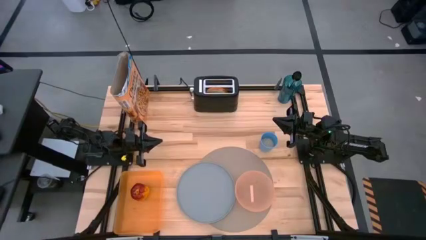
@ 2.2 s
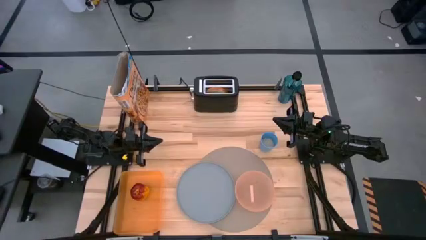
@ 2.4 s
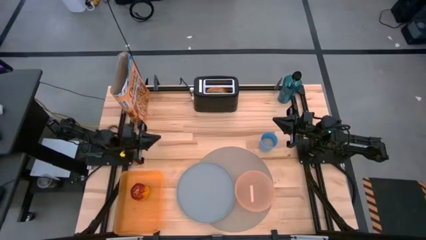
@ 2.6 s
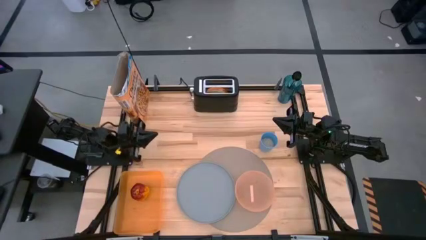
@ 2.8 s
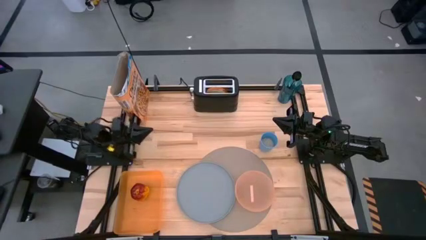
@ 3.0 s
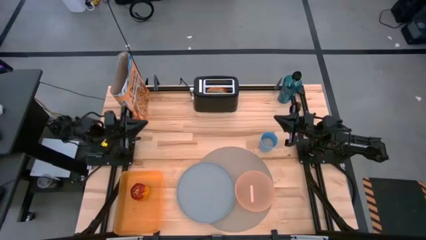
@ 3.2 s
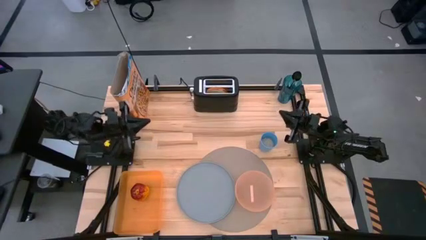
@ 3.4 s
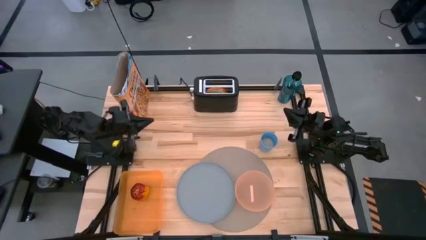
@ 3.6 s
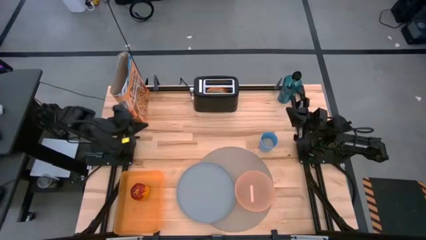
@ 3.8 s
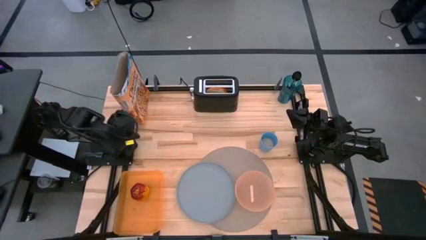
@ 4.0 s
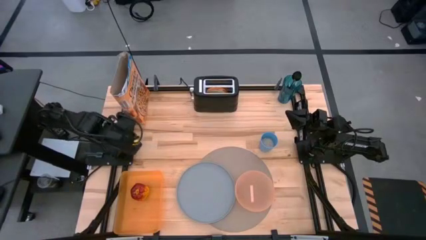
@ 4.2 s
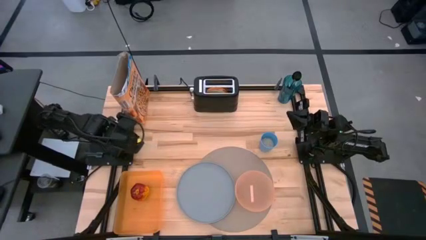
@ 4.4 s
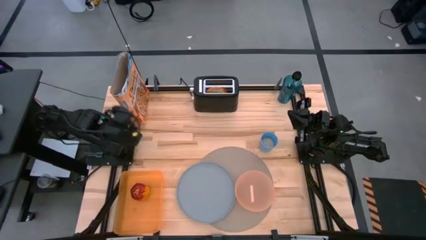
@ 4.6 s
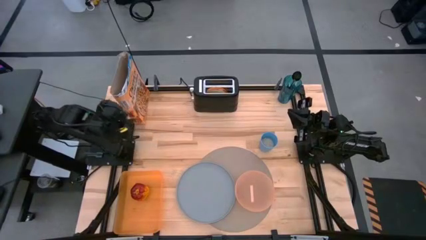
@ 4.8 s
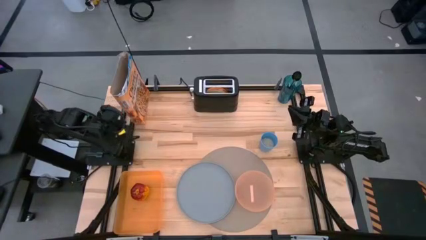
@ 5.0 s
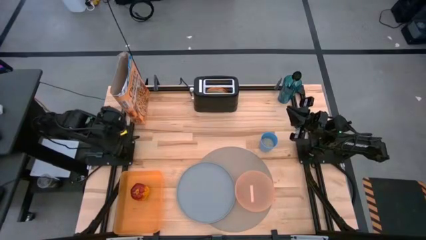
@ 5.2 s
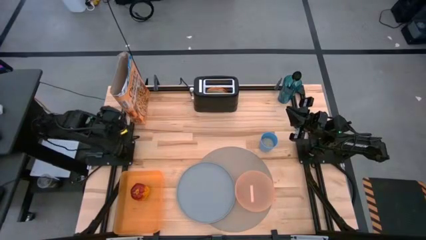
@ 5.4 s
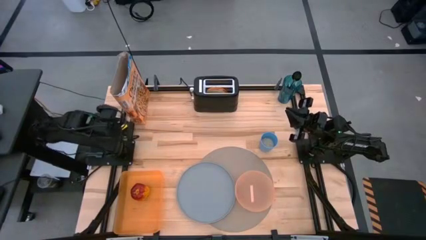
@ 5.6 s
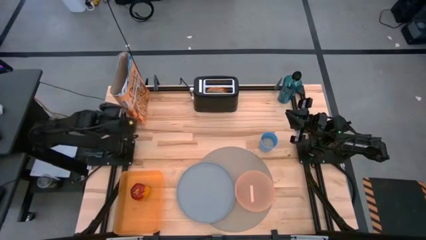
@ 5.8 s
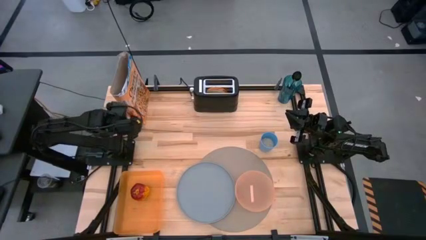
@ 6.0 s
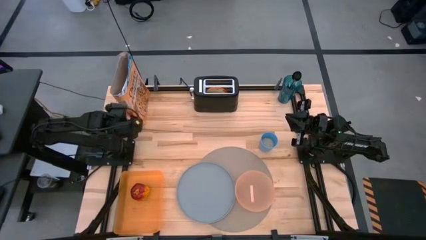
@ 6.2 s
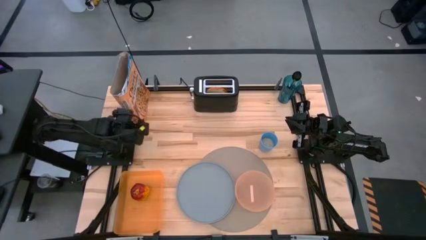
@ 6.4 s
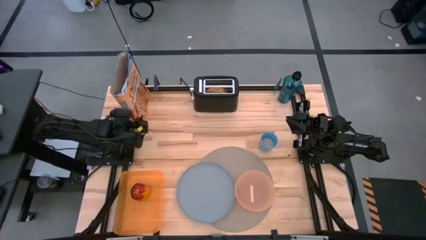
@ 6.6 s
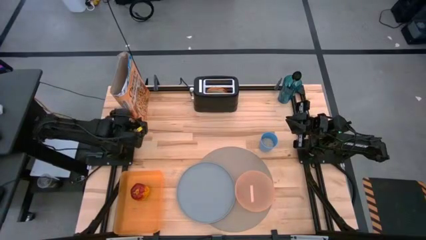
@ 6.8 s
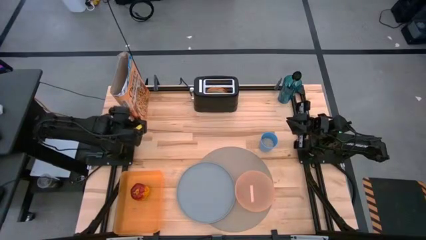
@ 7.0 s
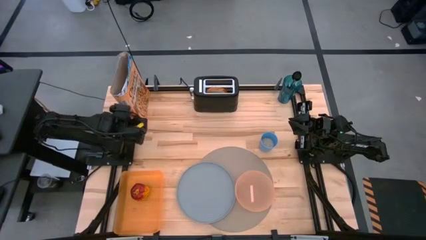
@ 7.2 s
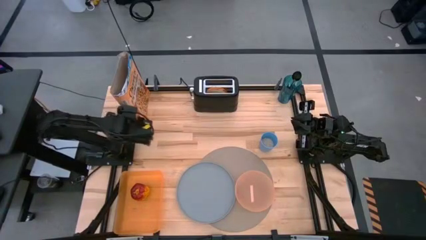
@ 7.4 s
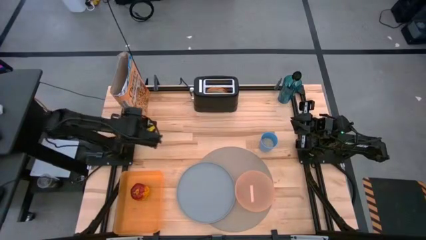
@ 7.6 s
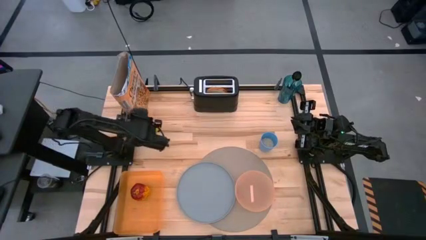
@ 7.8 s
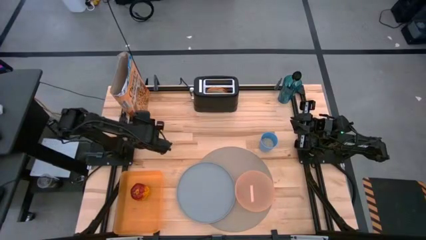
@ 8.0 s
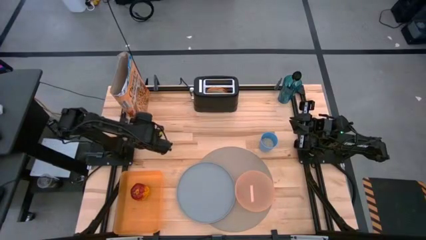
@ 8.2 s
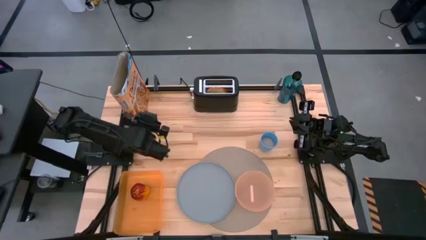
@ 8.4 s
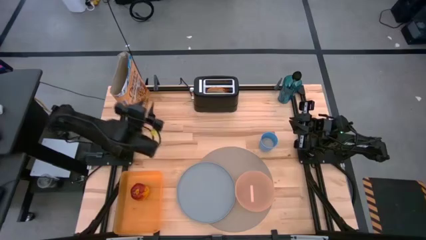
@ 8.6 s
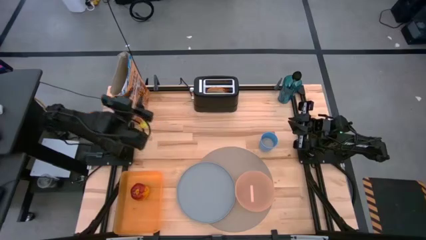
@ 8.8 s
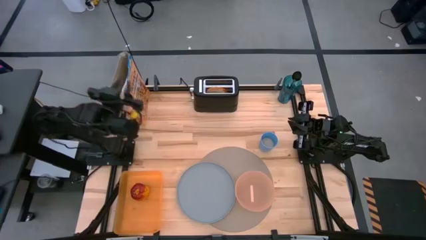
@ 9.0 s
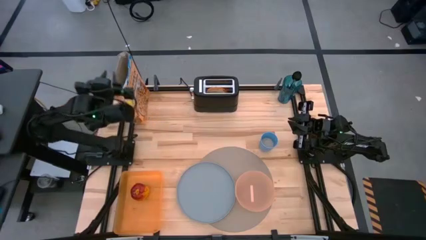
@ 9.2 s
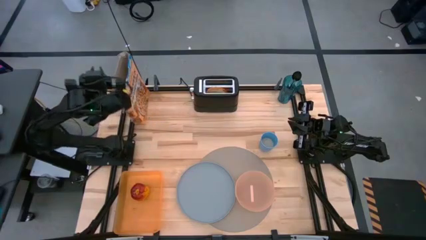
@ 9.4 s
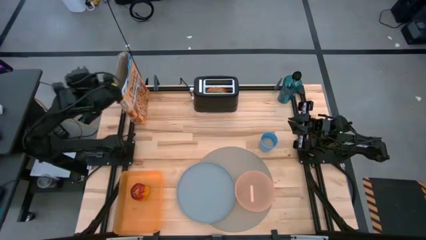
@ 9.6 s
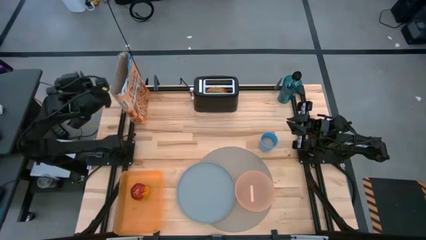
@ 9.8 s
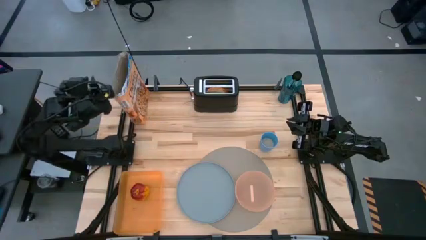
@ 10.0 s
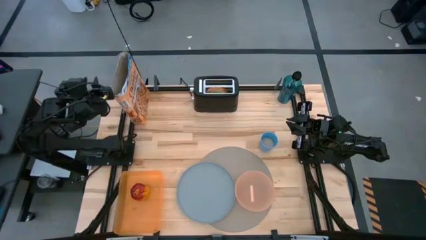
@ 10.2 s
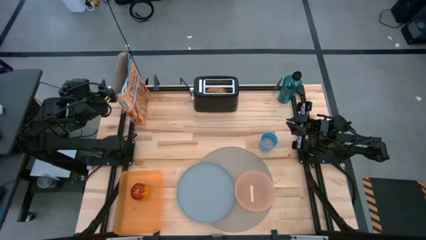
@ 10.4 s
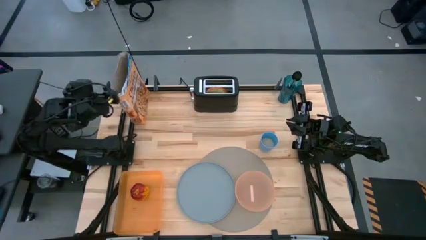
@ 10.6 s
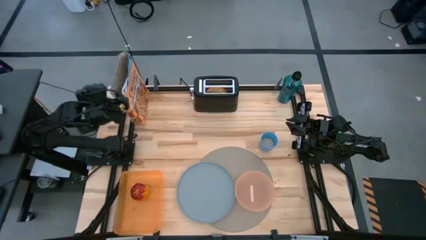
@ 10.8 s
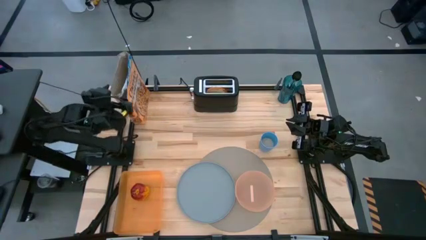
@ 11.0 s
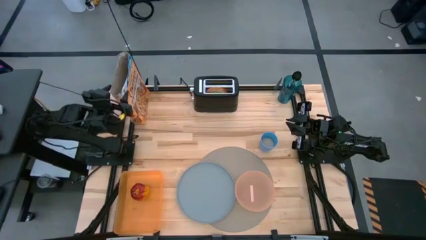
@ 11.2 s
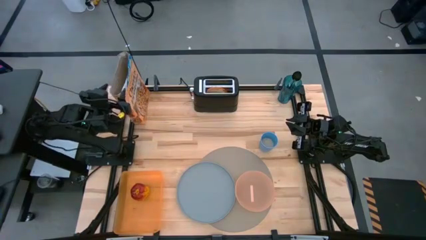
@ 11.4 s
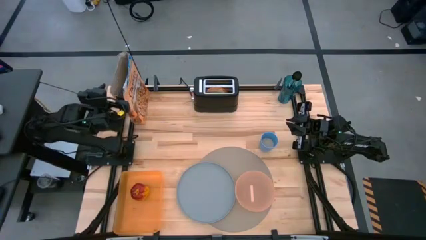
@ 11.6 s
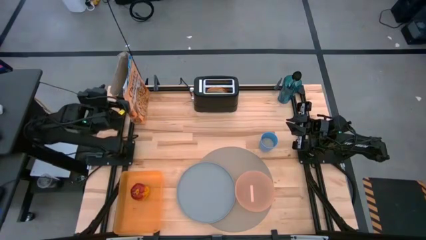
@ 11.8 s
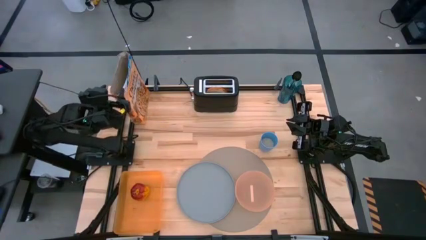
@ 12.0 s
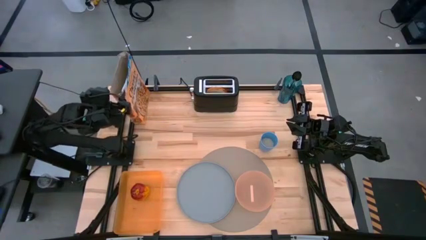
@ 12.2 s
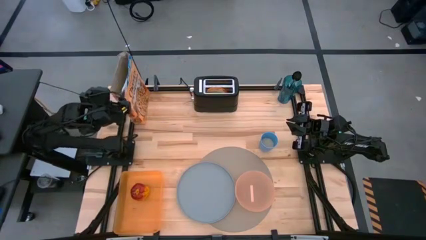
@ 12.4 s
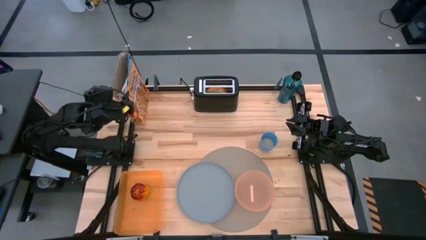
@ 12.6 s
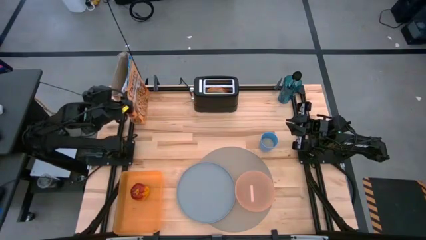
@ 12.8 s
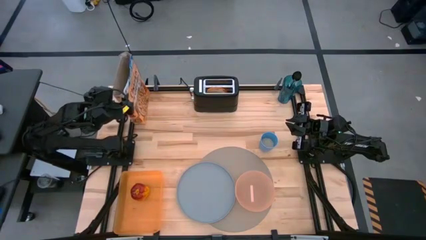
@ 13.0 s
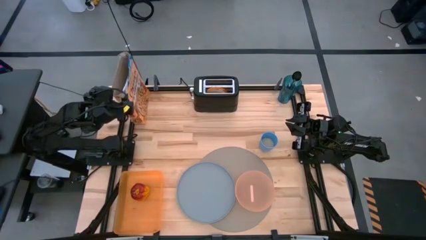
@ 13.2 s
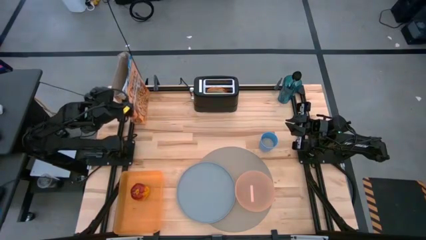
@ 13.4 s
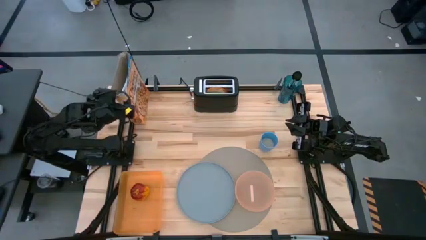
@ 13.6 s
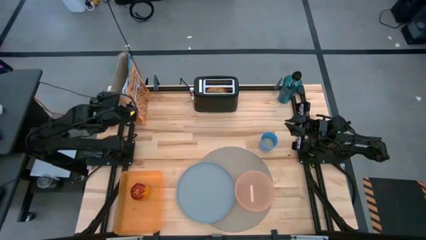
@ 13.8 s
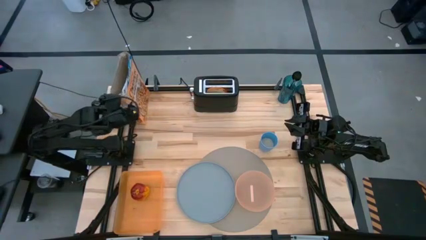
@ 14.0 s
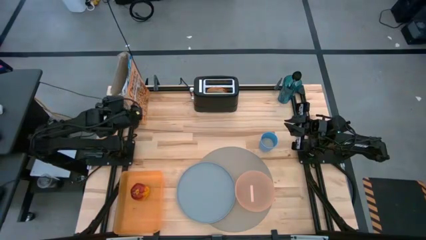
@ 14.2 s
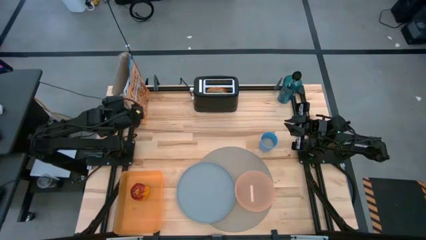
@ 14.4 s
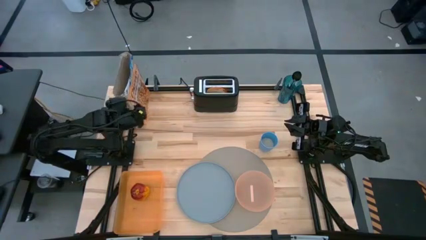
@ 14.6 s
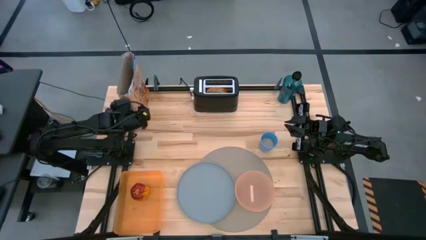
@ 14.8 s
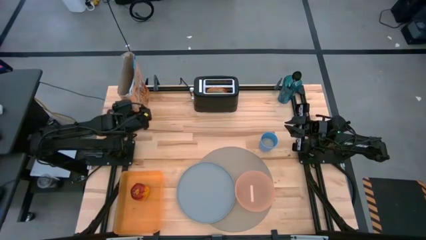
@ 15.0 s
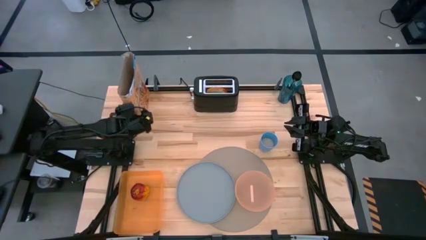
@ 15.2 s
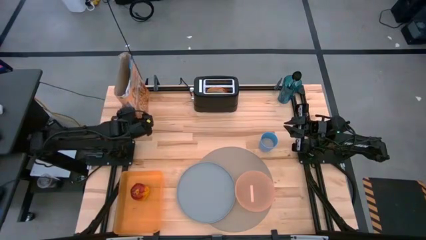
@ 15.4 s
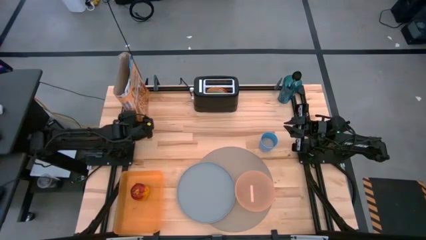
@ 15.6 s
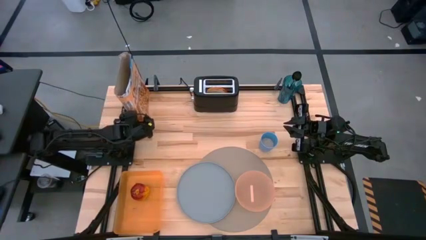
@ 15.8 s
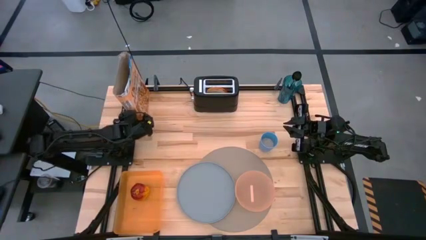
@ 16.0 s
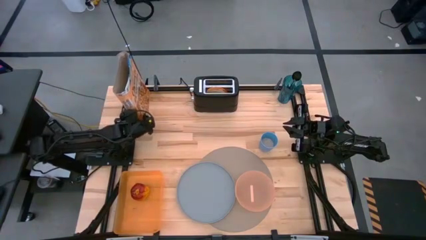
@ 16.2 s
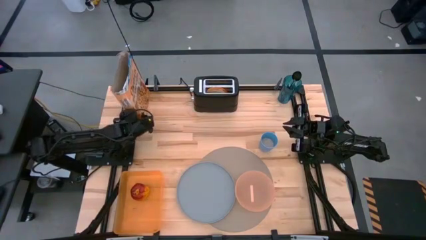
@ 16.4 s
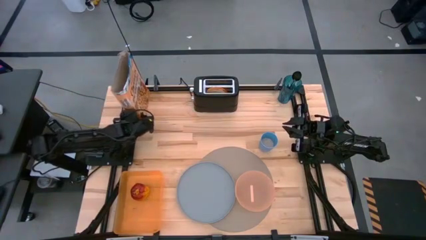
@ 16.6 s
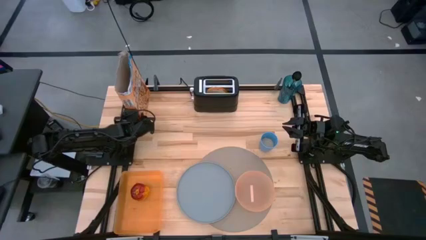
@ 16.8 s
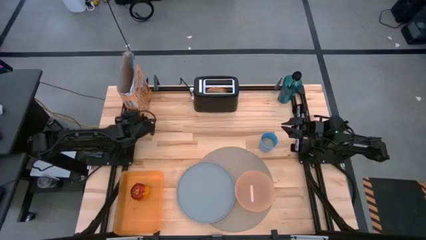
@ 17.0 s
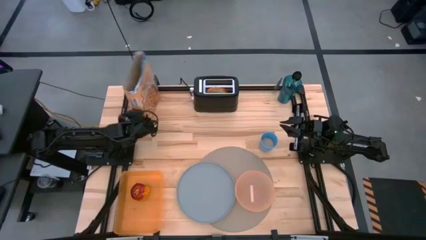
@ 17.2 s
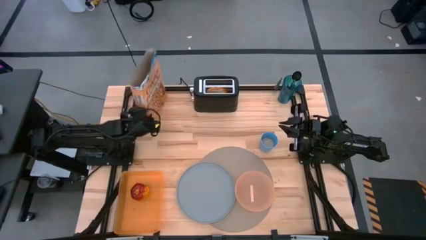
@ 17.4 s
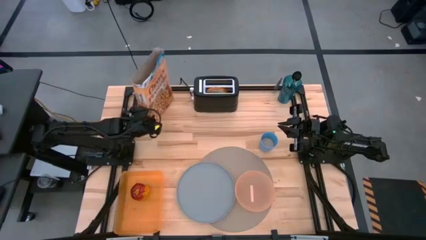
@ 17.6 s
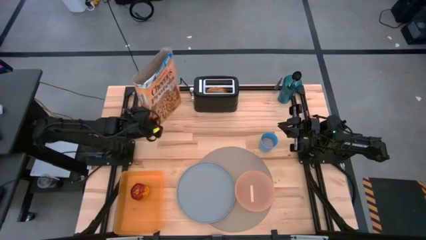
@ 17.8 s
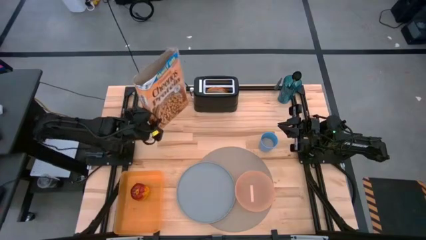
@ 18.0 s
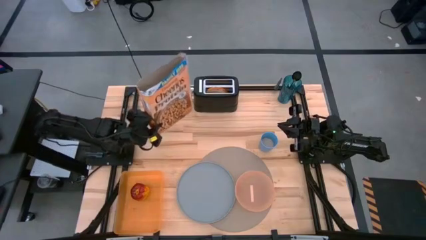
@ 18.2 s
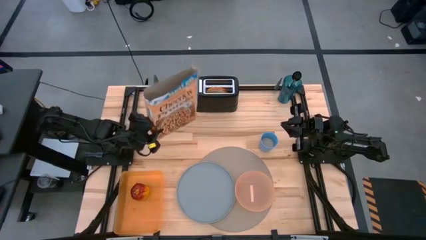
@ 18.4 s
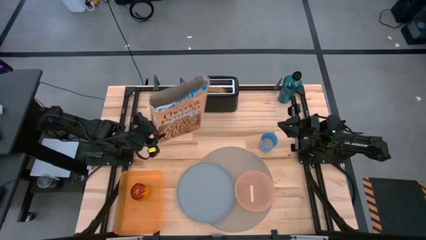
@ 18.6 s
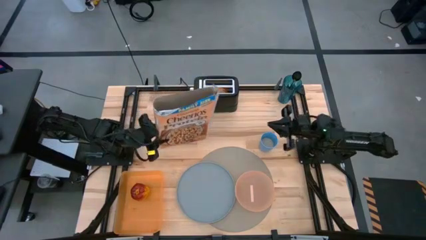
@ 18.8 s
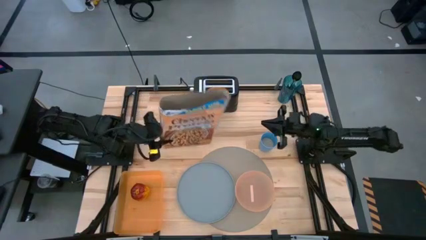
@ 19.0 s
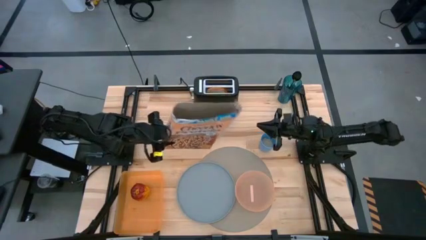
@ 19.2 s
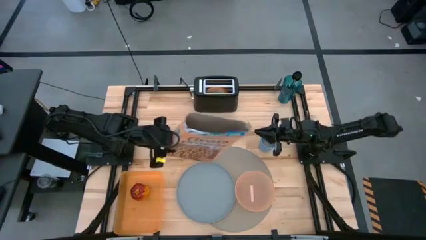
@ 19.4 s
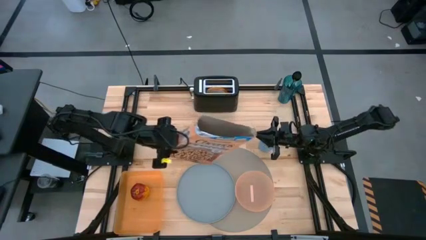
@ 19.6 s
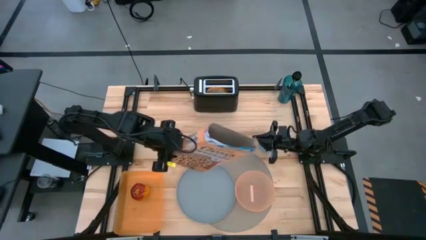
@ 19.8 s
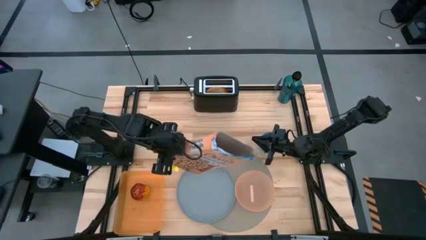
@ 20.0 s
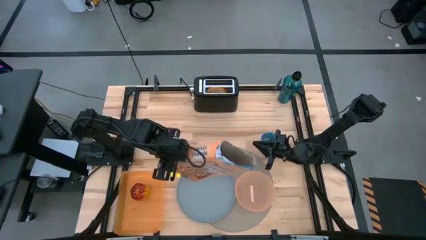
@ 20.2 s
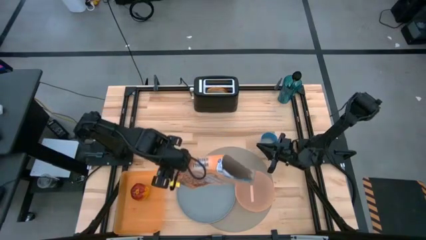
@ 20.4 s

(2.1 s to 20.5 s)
Task: Arrange a breakfast setting
Pour the cereal from the cereal box into the orange bowl
